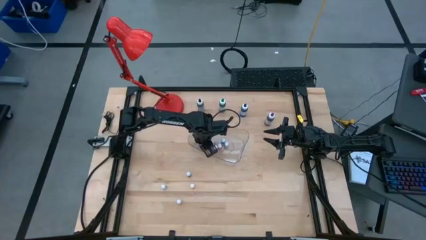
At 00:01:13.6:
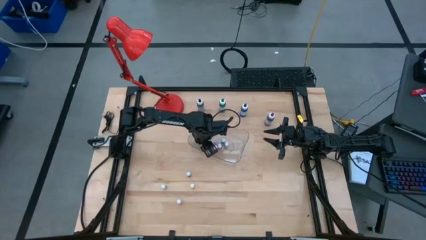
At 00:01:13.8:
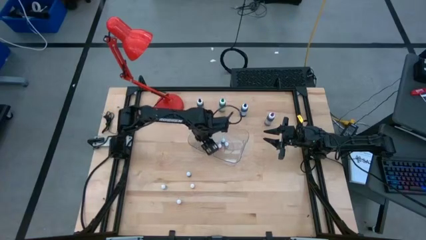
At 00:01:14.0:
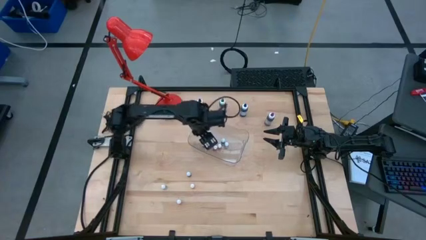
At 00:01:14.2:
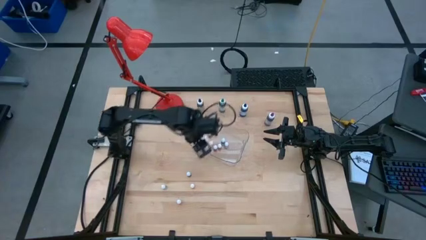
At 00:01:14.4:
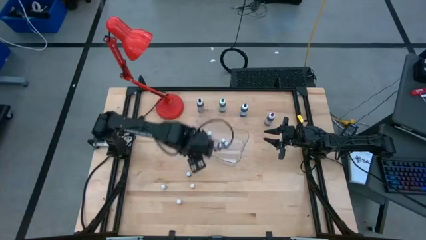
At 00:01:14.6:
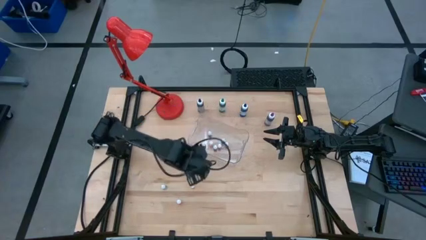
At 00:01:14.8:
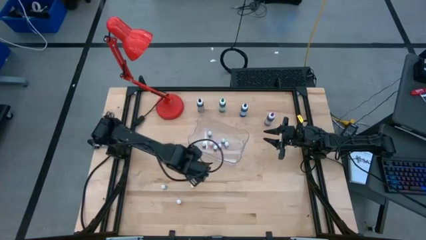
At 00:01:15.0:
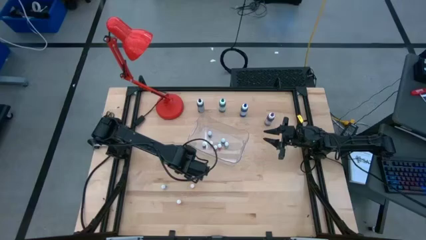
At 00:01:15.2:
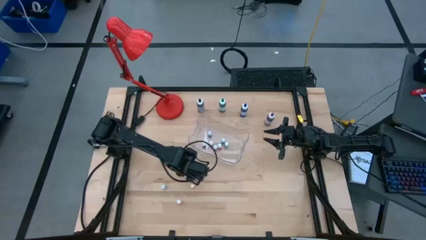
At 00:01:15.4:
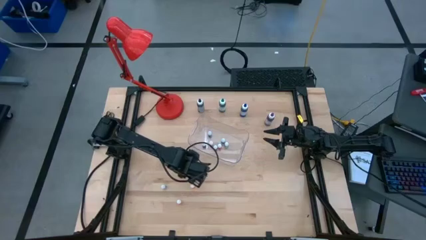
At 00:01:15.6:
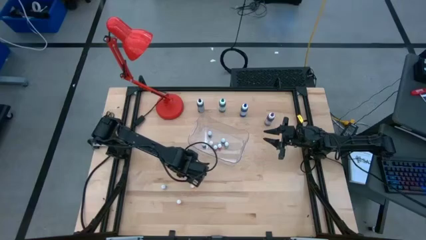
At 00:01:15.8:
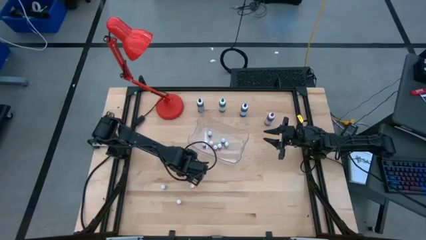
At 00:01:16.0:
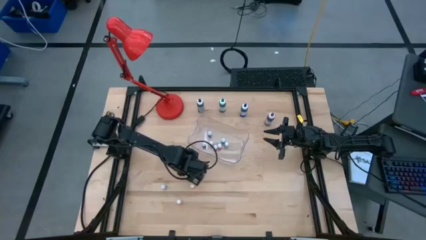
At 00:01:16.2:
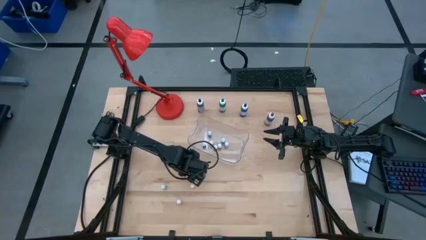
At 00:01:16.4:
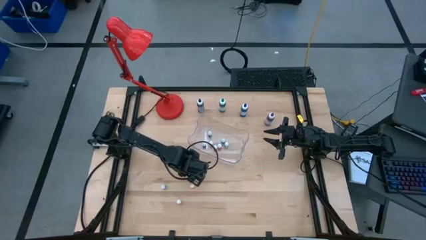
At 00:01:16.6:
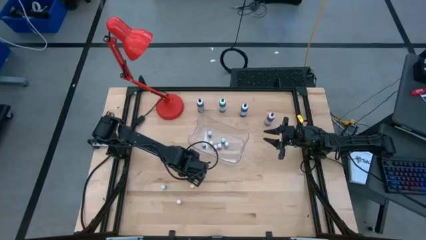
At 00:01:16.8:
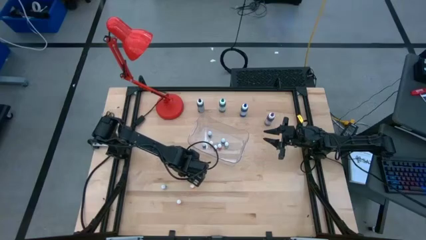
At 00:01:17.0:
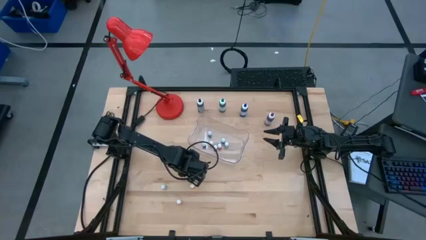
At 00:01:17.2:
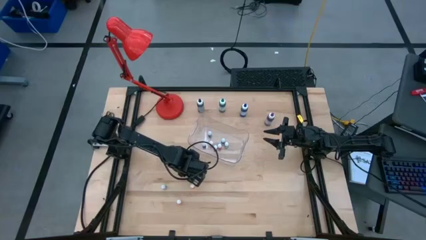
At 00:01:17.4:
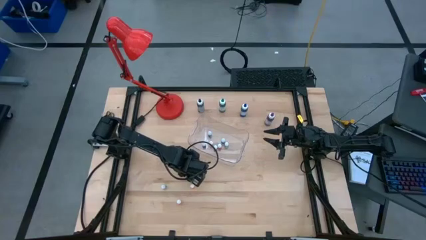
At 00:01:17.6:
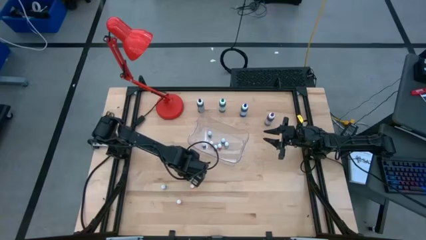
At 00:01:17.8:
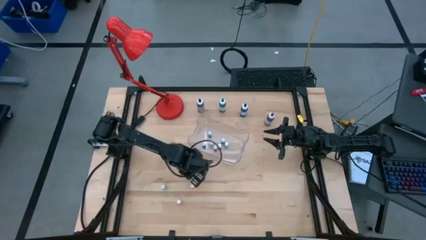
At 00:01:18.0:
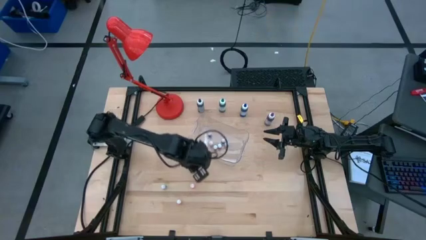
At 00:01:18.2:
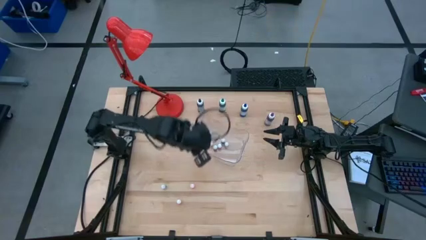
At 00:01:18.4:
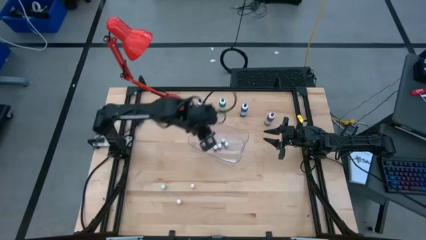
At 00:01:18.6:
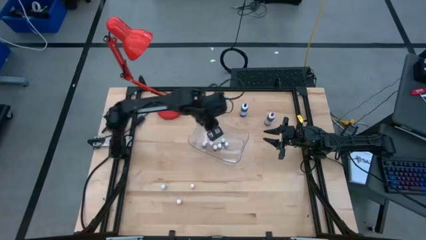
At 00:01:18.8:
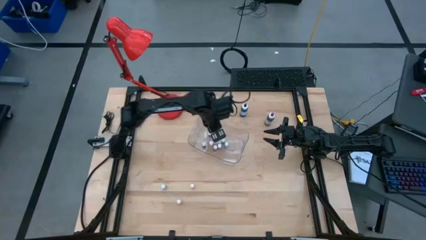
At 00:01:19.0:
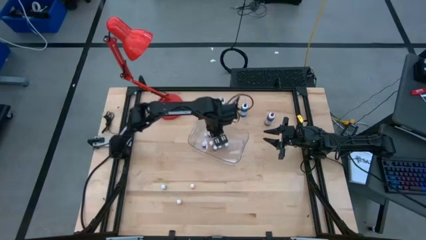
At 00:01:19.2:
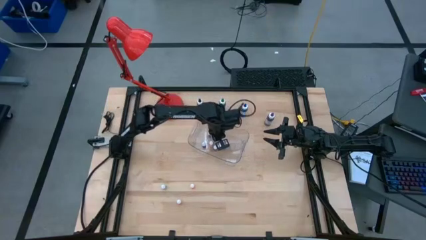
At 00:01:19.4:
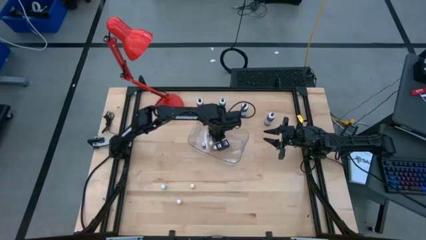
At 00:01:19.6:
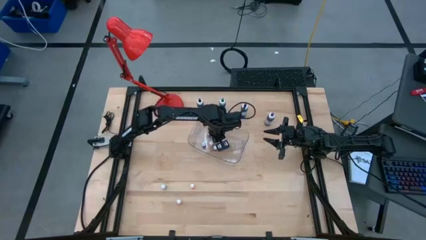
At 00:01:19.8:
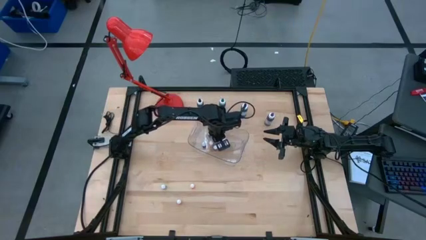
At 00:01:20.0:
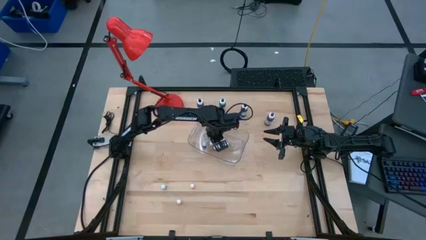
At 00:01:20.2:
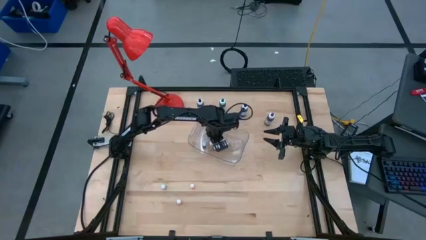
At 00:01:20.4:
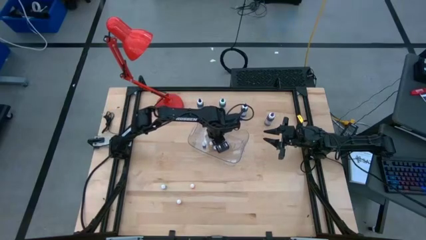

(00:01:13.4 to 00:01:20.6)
Task: Pick & Place food coloring
Put the small blue food coloring bottle in the transparent bin

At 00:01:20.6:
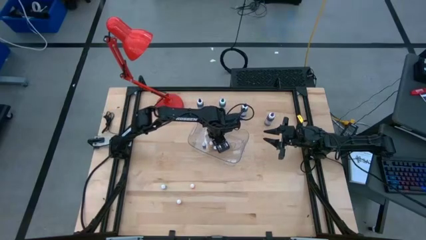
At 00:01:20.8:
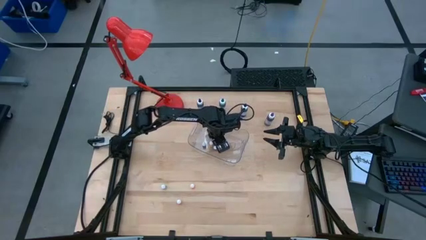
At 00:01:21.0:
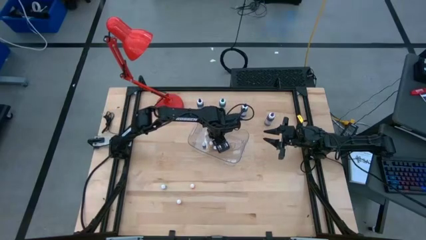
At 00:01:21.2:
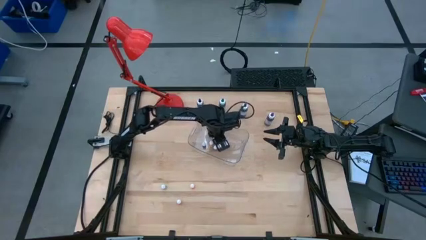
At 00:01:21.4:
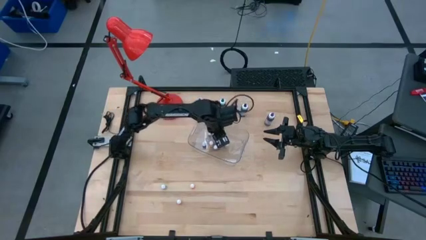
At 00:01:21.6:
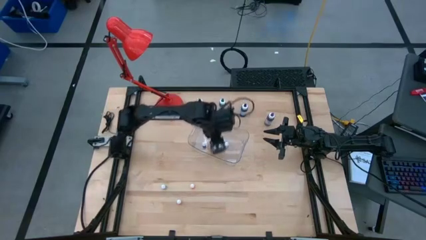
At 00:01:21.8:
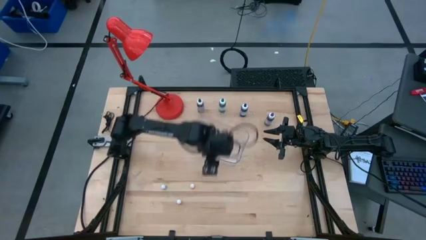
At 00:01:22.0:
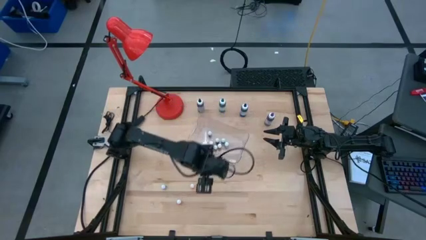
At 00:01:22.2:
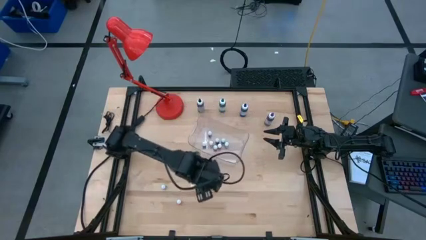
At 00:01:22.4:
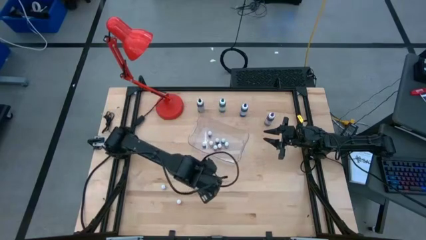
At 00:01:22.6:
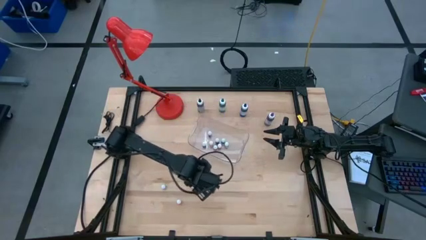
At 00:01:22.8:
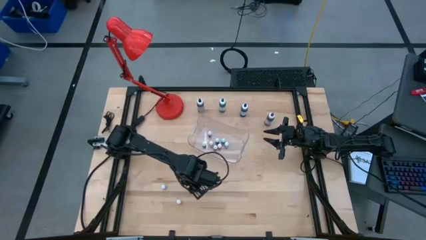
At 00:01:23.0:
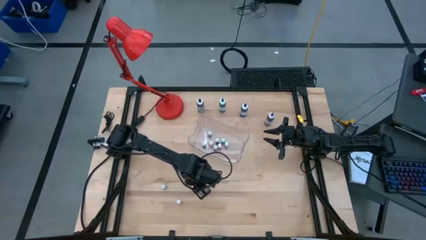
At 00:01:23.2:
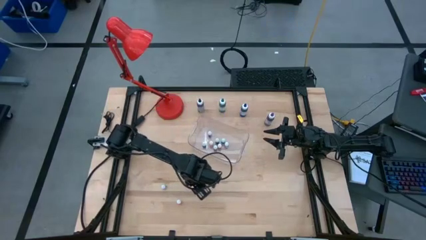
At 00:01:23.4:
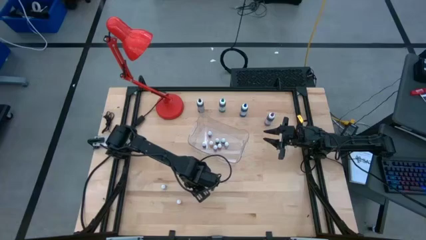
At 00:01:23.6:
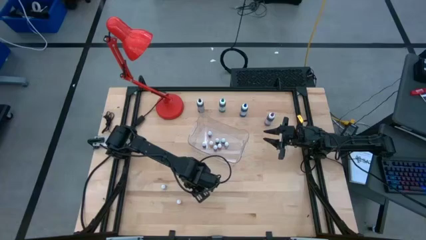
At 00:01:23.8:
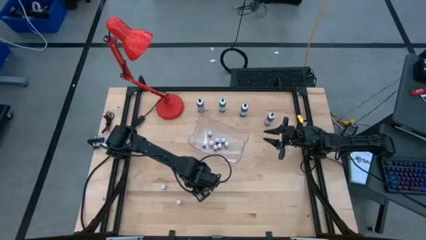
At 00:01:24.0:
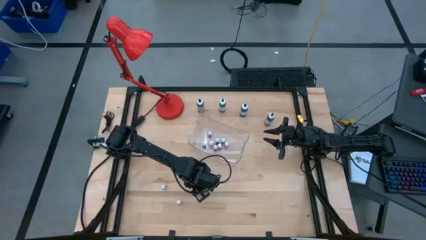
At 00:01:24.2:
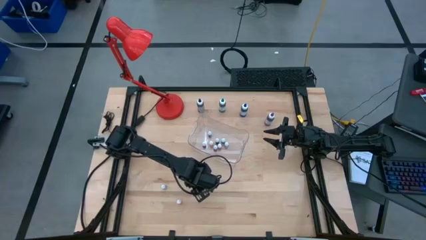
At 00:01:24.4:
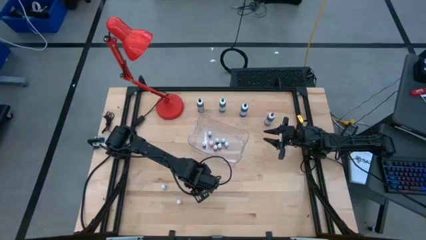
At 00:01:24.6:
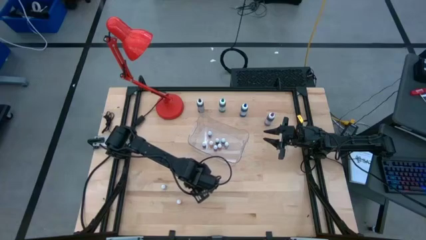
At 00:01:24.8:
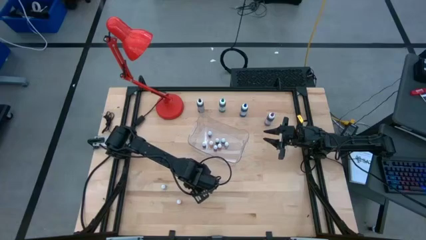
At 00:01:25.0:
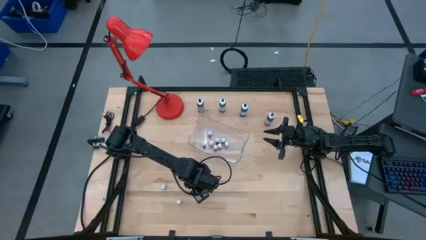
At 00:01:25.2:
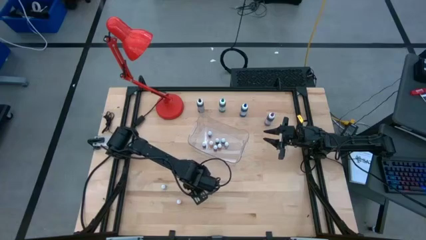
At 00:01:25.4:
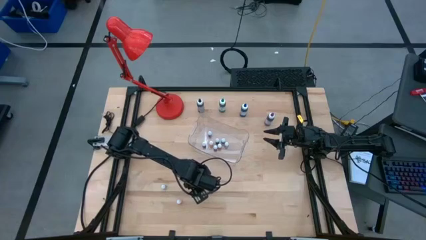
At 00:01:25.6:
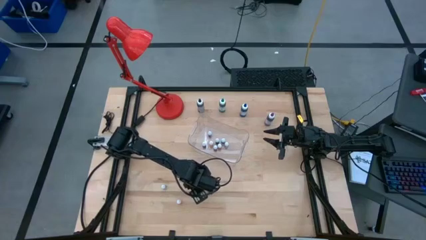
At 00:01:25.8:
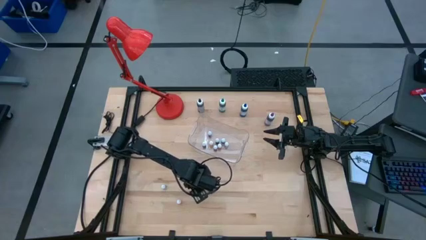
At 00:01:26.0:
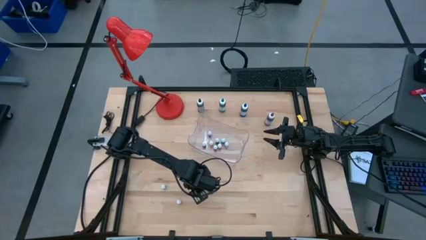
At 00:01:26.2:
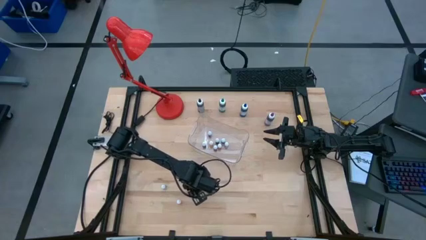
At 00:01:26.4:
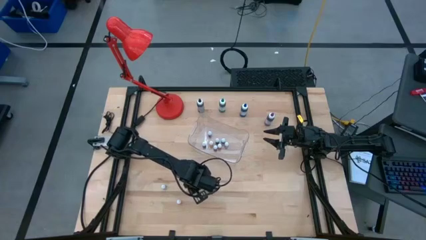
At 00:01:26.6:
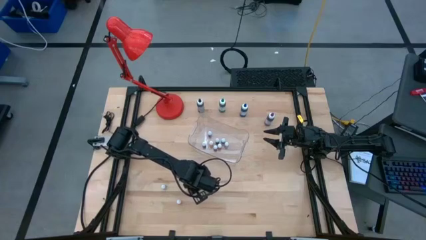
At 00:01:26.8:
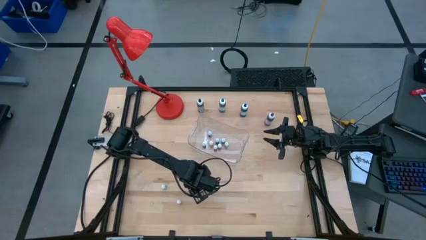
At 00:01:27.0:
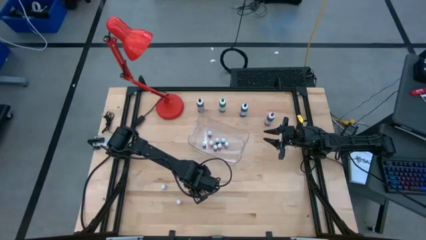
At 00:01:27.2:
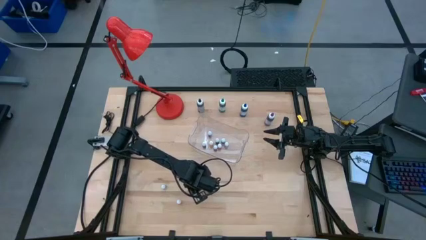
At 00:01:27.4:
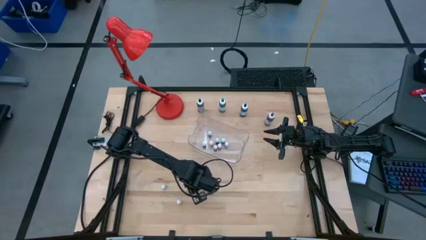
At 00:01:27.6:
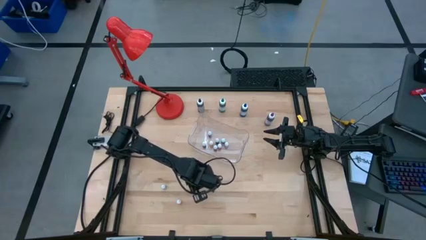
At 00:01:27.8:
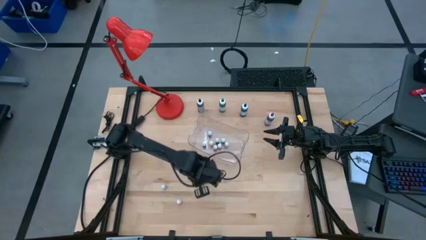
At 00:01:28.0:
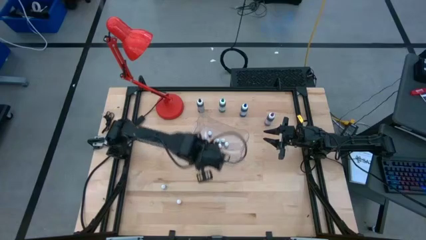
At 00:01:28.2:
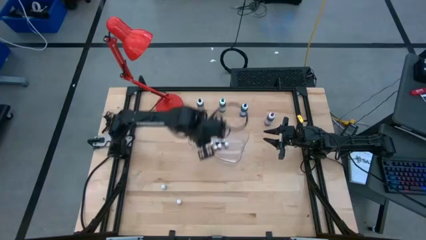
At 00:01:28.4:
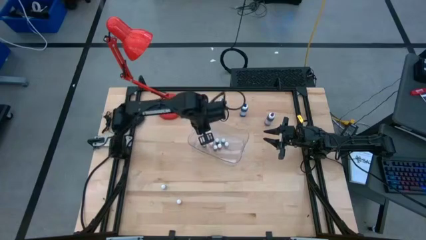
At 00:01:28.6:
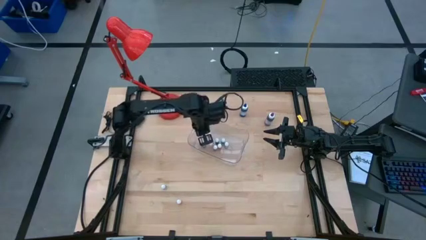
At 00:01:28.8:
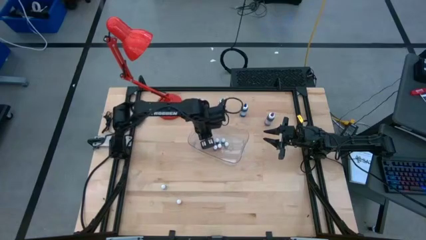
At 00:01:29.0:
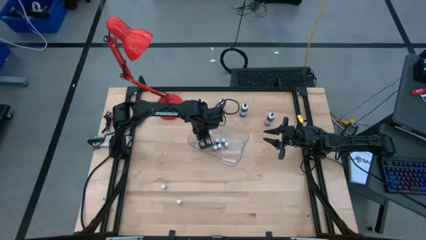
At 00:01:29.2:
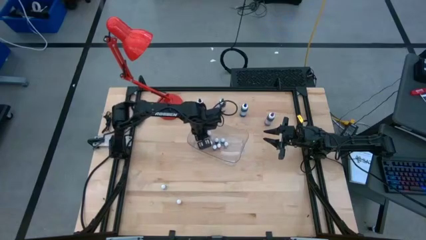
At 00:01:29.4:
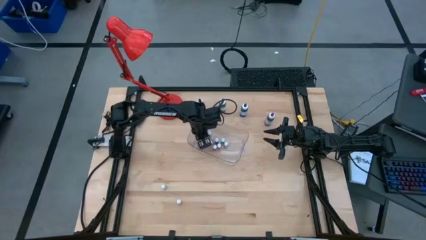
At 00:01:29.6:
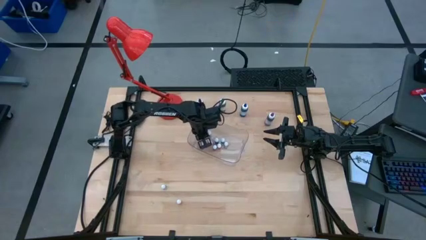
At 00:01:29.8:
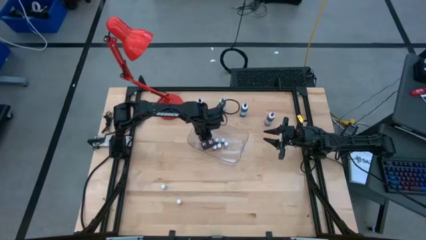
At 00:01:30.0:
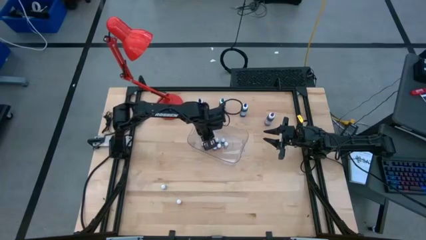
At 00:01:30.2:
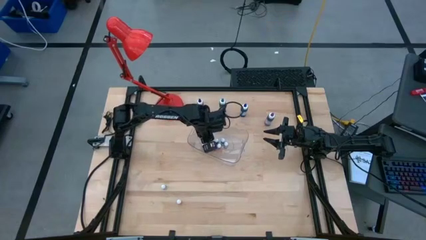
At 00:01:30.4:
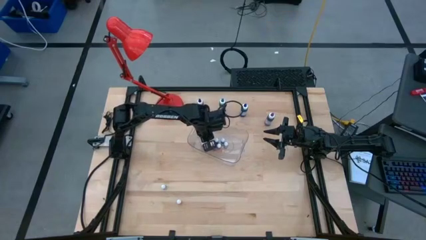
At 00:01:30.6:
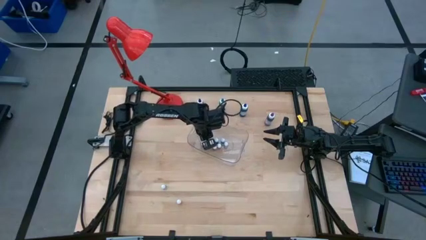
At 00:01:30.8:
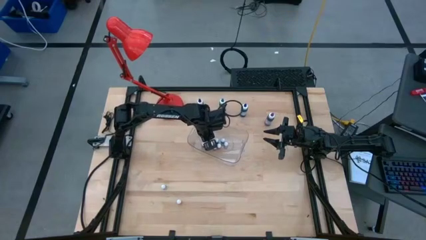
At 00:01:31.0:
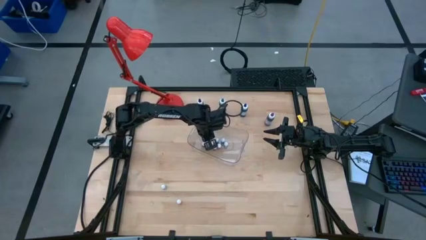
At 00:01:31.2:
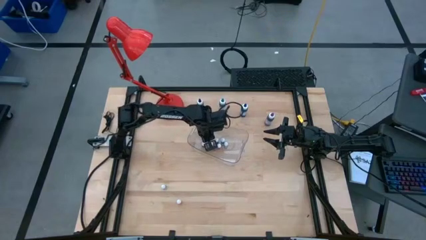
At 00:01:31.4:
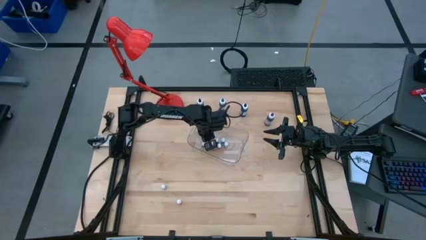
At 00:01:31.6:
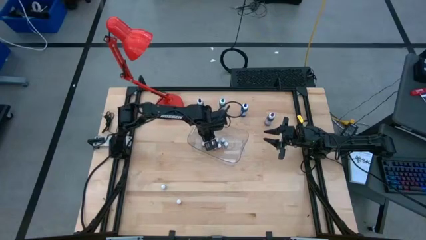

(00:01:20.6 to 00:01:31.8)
Put the small orange food coloring bottle in the transparent bin
